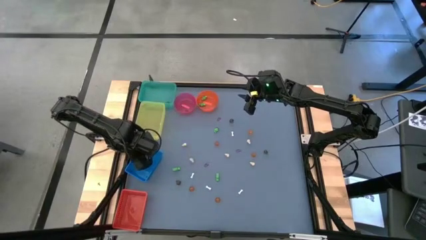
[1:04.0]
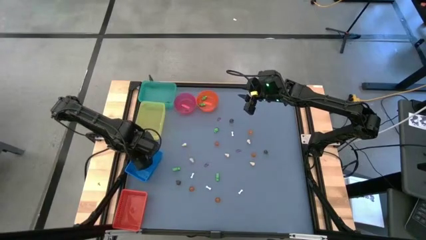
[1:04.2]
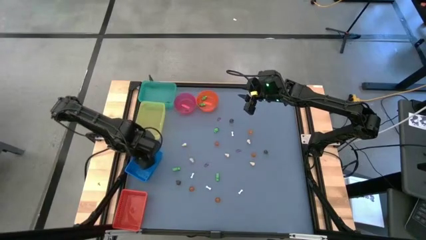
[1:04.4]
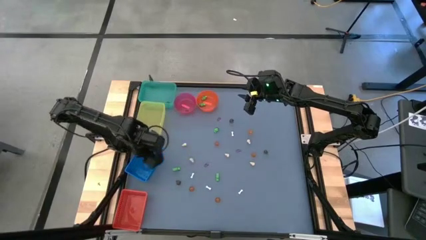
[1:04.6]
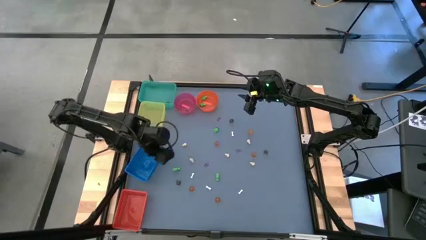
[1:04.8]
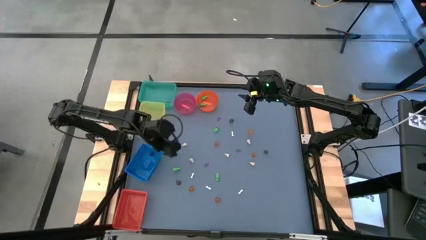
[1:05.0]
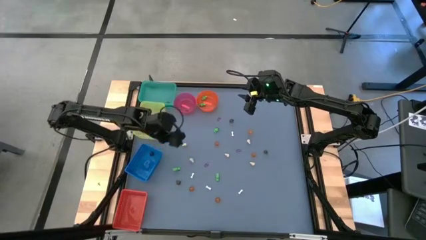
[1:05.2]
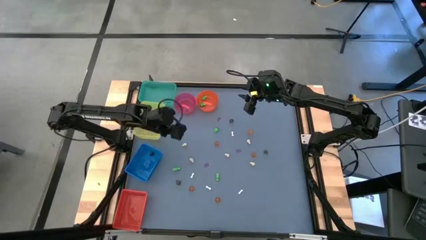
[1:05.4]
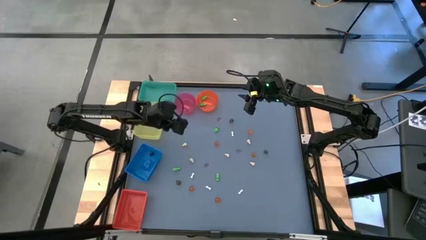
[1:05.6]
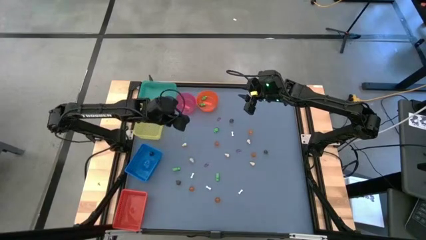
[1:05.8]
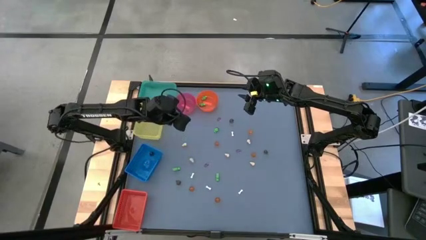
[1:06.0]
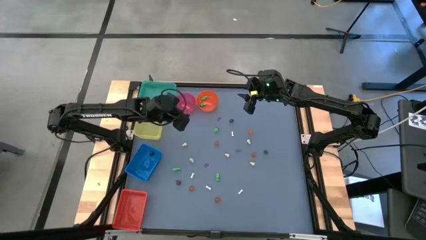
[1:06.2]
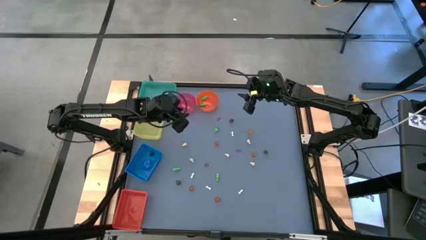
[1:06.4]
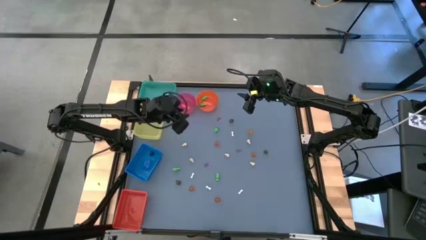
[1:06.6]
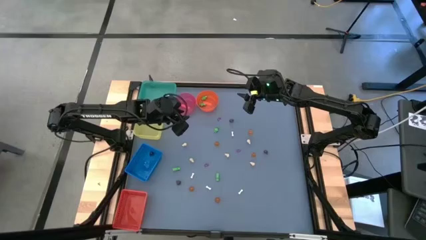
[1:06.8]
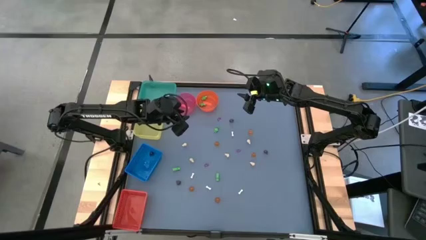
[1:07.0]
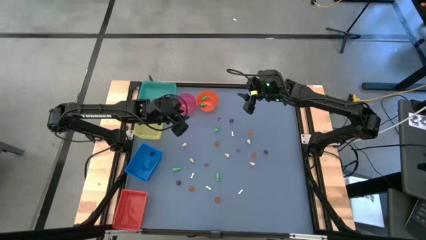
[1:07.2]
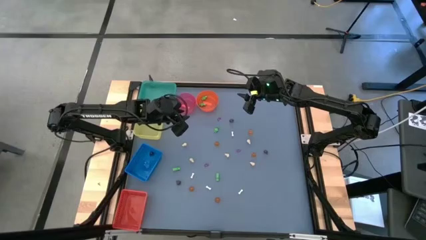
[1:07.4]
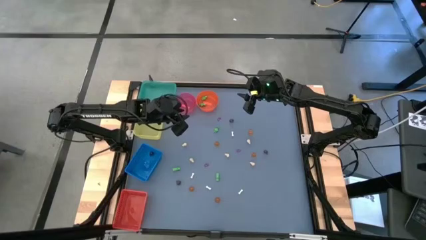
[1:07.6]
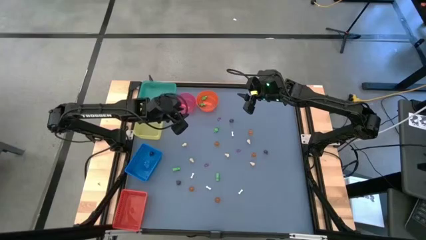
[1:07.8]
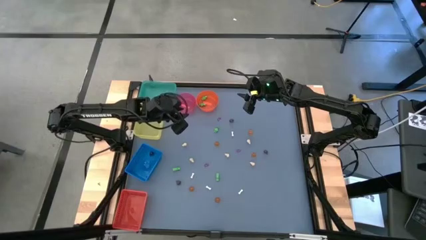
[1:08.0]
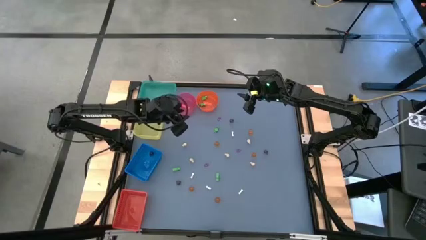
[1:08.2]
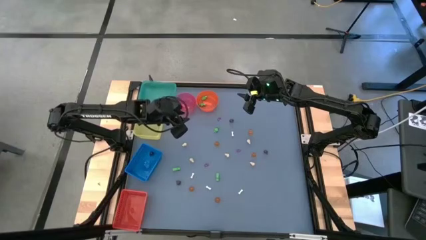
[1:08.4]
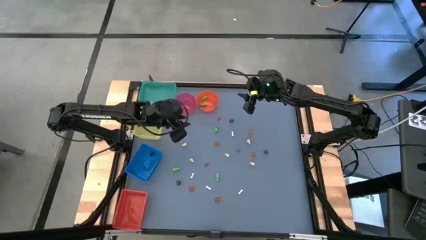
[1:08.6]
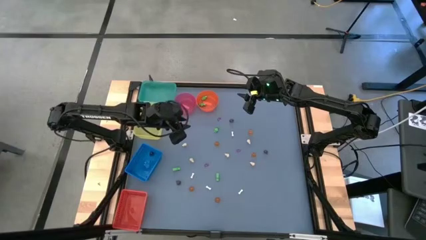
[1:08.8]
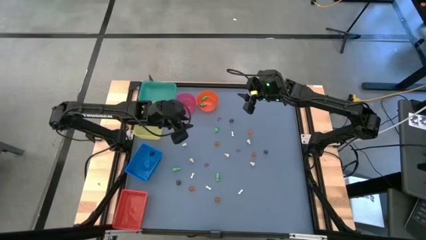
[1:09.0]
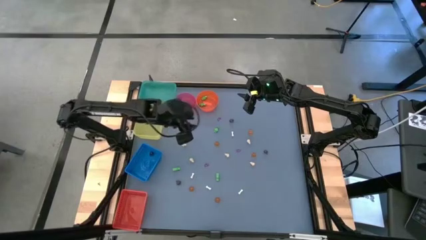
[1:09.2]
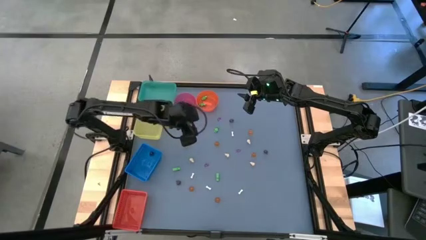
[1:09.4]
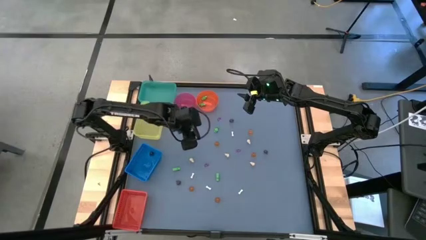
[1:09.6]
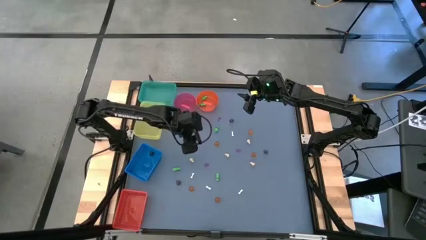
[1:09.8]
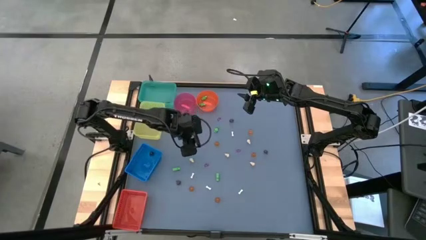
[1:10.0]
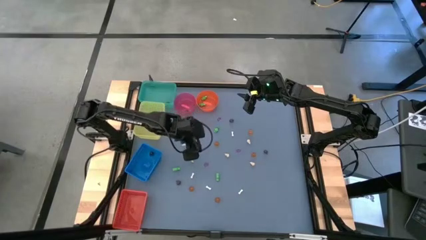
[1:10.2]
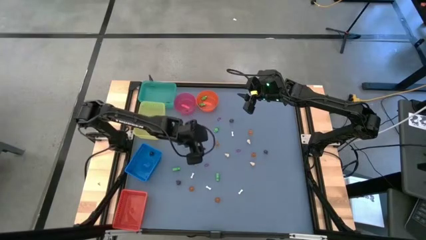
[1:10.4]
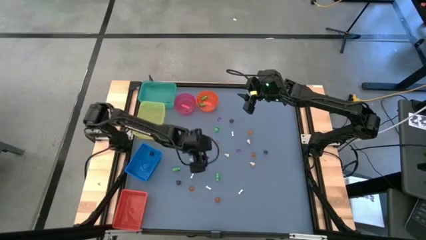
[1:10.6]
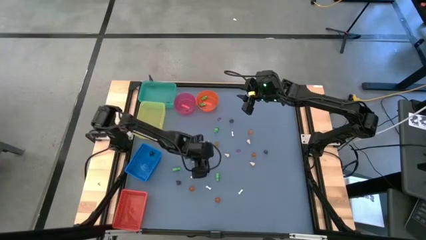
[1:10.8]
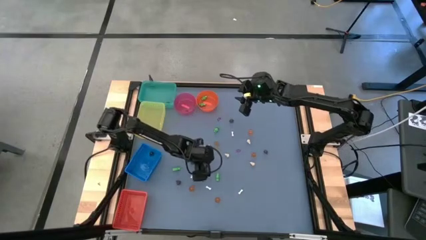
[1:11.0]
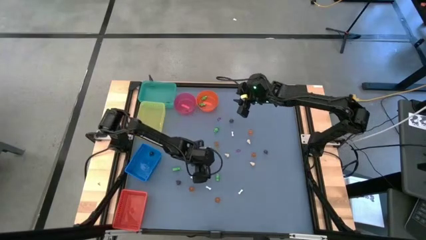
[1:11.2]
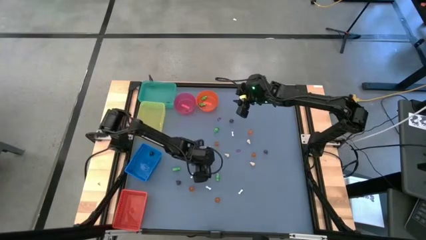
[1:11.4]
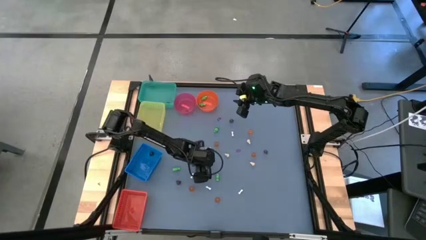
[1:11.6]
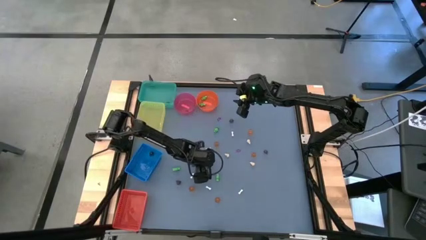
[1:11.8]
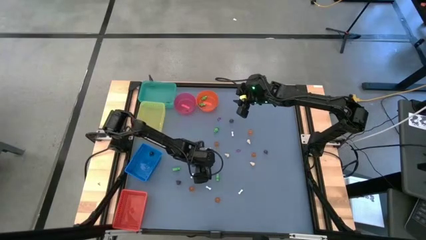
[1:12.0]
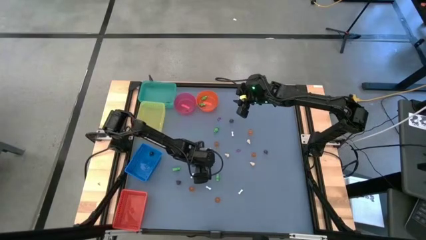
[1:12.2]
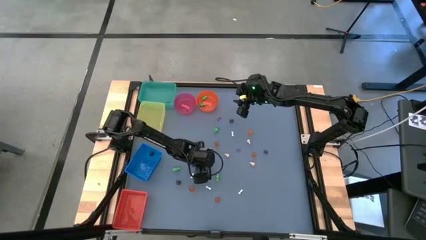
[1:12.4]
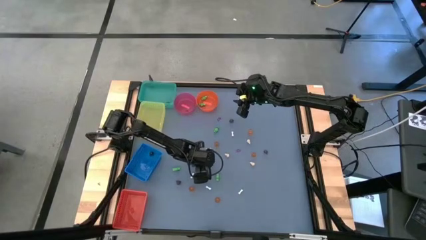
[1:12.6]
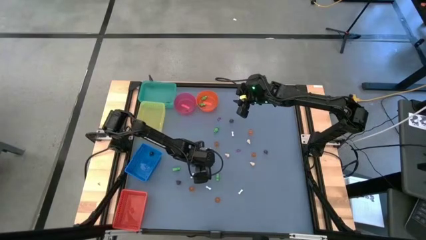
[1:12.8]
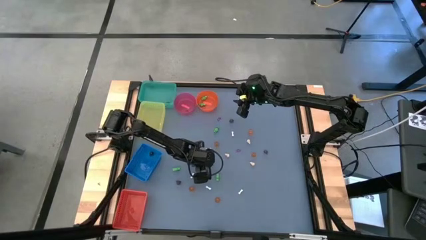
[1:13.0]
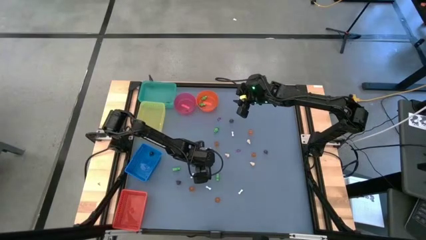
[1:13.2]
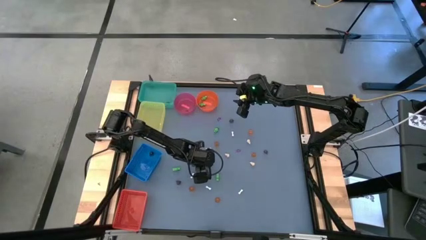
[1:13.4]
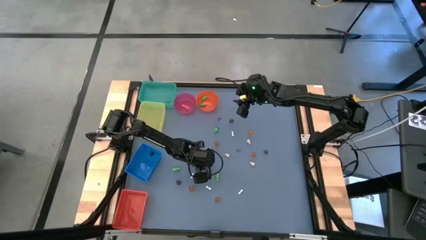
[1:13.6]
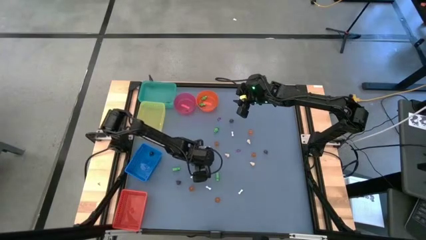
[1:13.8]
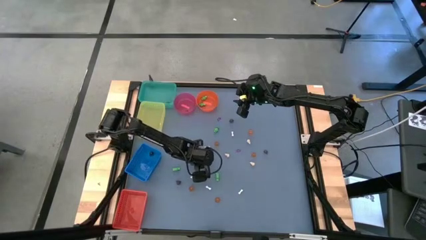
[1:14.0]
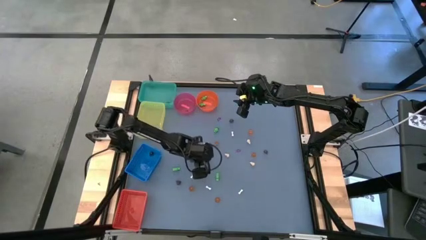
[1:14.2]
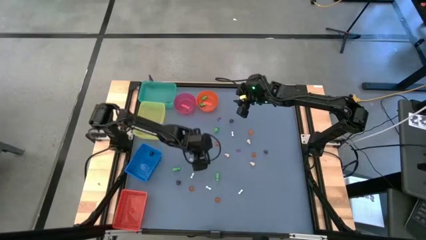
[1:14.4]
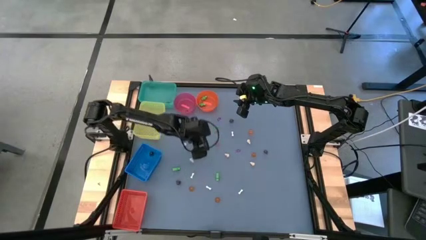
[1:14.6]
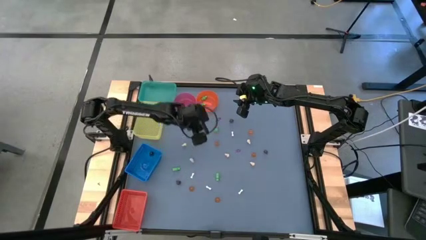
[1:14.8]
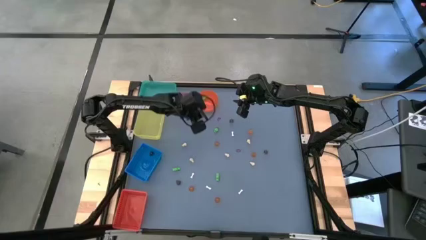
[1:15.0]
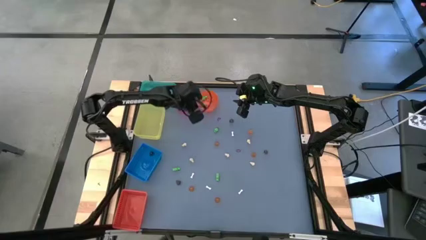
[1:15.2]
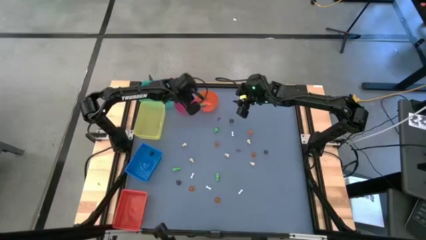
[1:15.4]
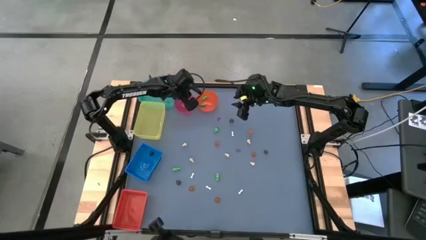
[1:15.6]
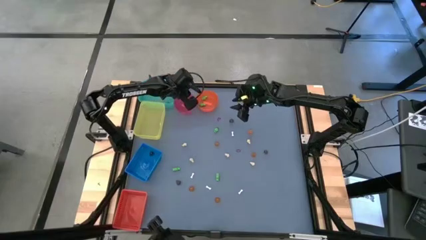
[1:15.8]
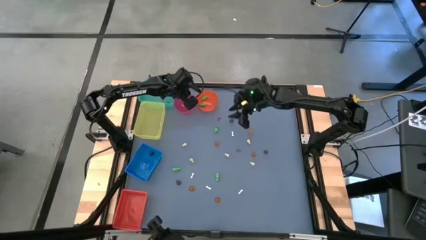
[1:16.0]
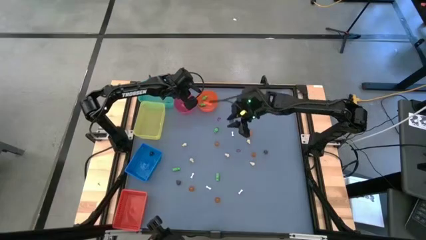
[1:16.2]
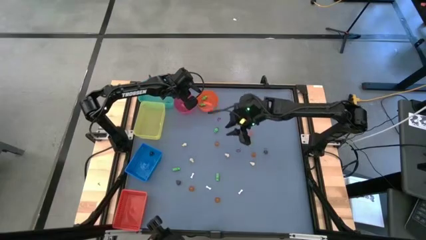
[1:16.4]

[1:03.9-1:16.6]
Task: Sort Halloween decoration
Put the purple witch hat toy into the pink bin
